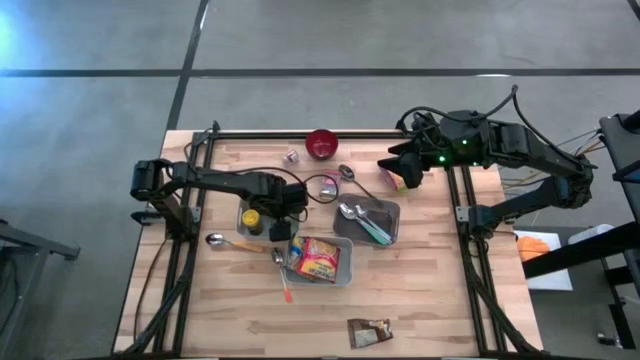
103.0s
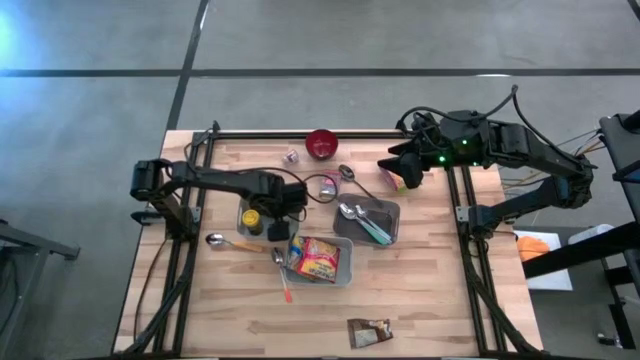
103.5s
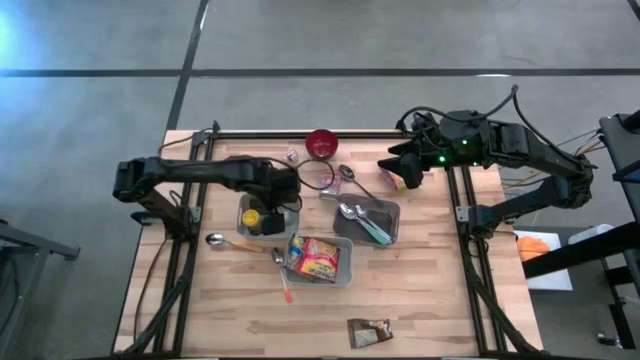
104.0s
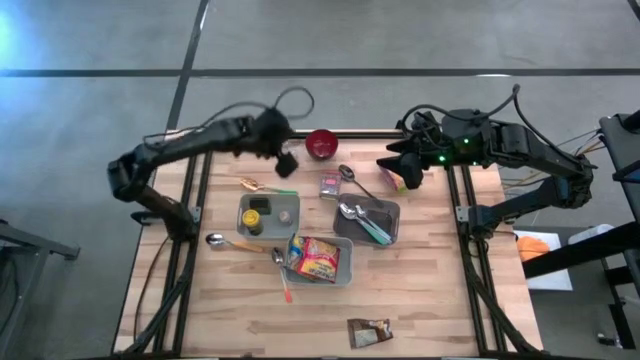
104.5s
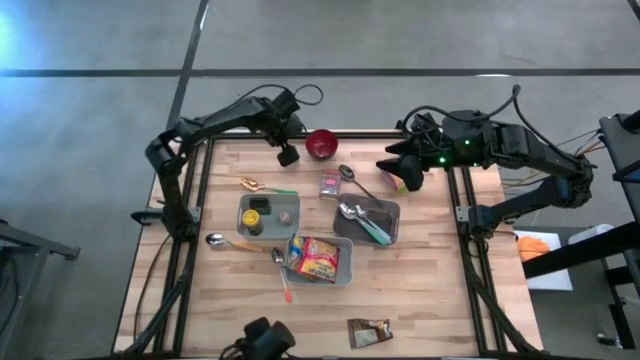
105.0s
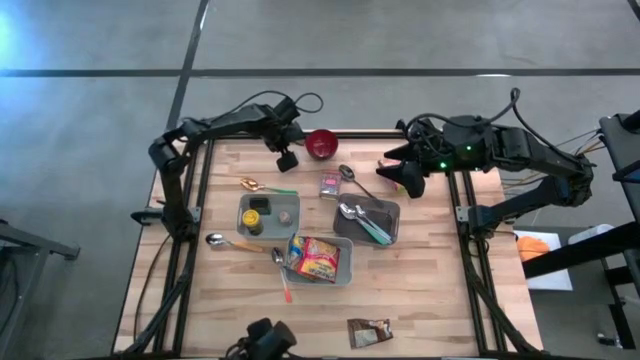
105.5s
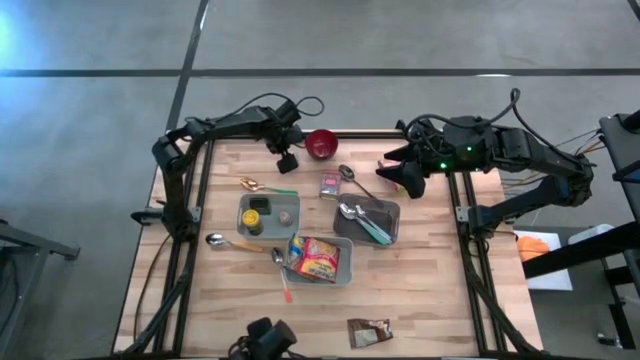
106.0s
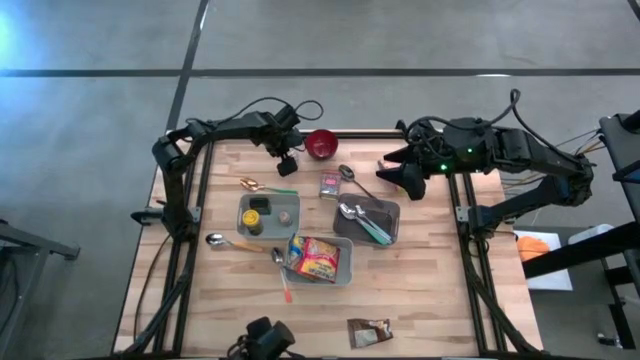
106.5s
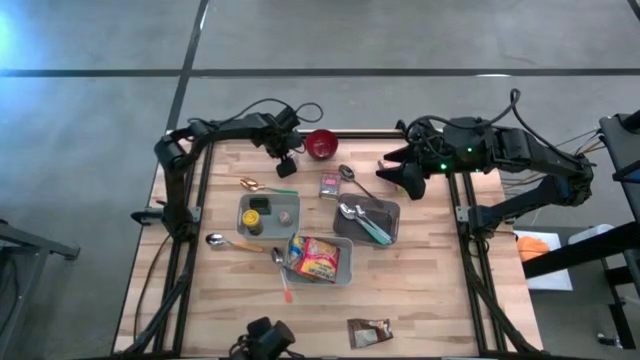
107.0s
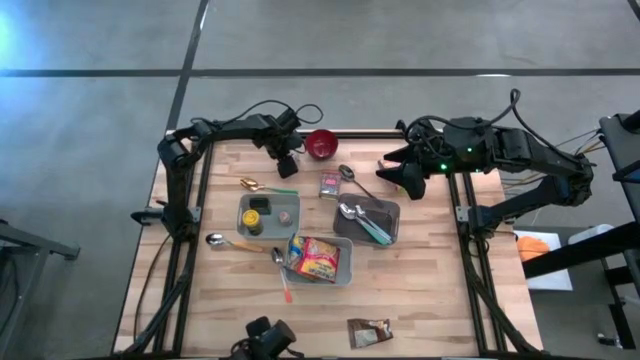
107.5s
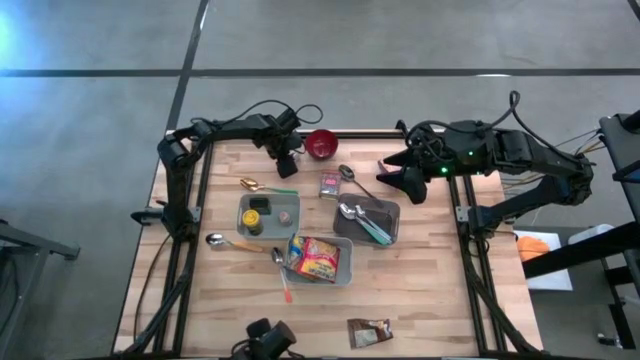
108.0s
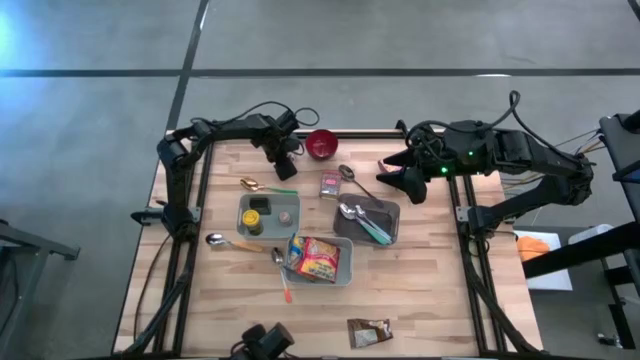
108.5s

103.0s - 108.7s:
Put the brown seasoning bottle into the top gray bin

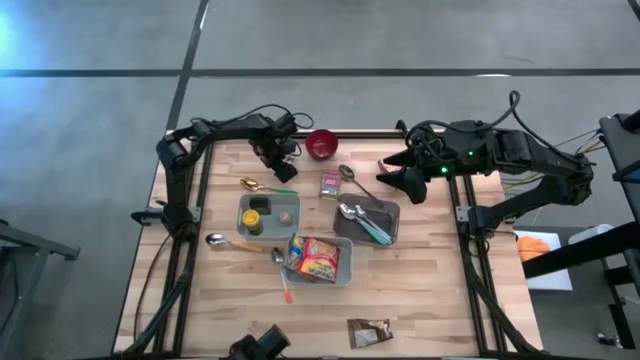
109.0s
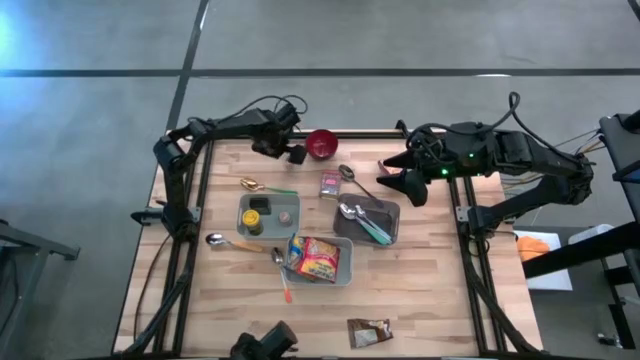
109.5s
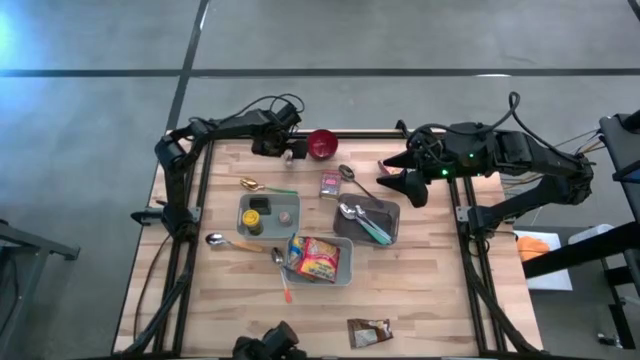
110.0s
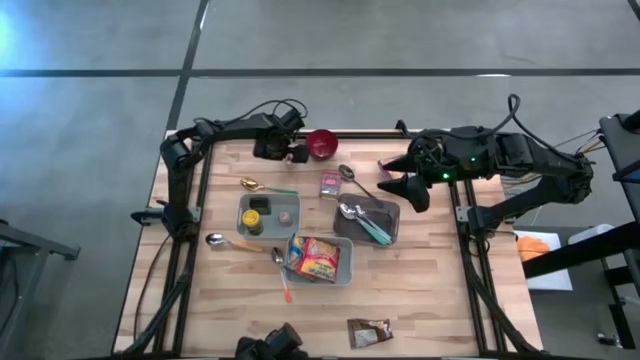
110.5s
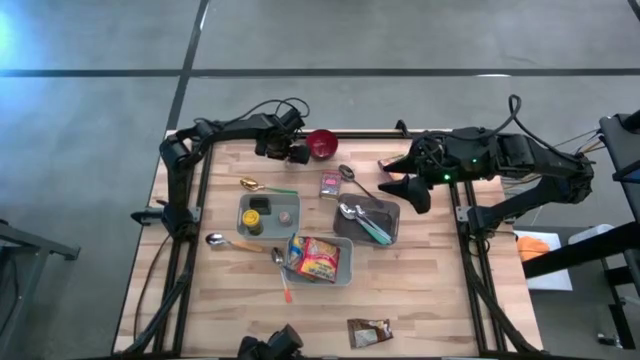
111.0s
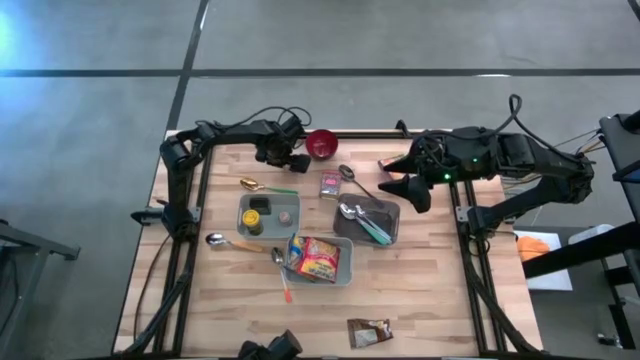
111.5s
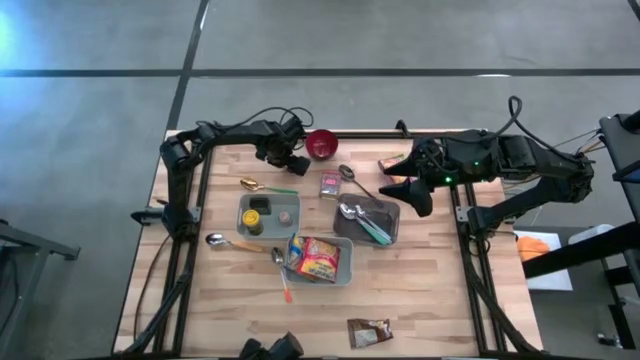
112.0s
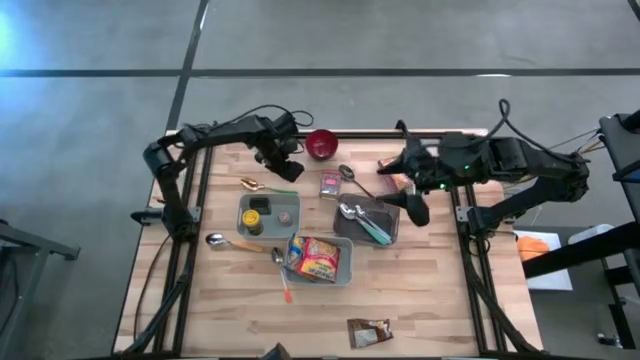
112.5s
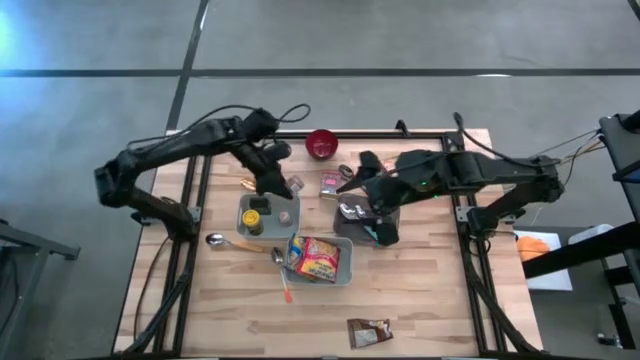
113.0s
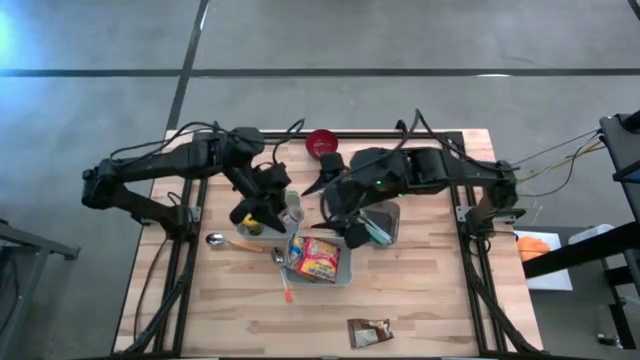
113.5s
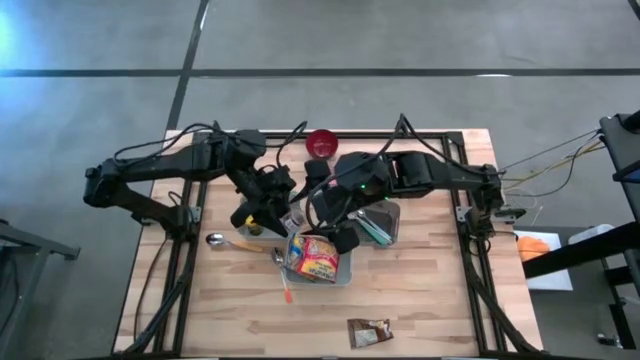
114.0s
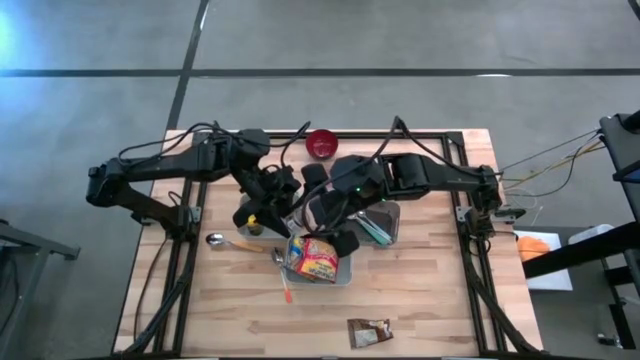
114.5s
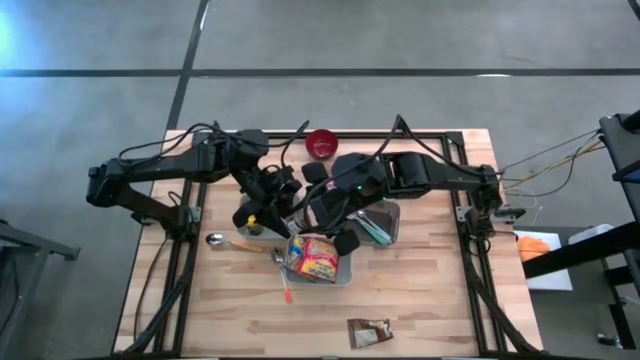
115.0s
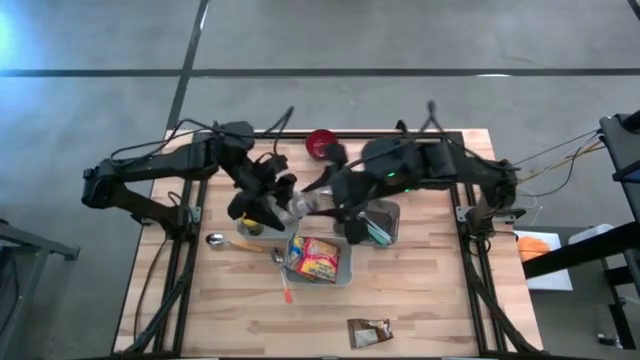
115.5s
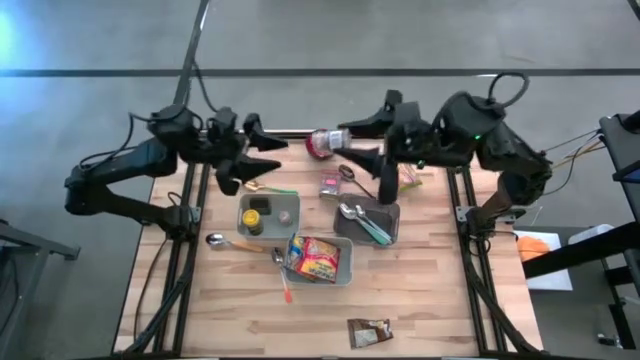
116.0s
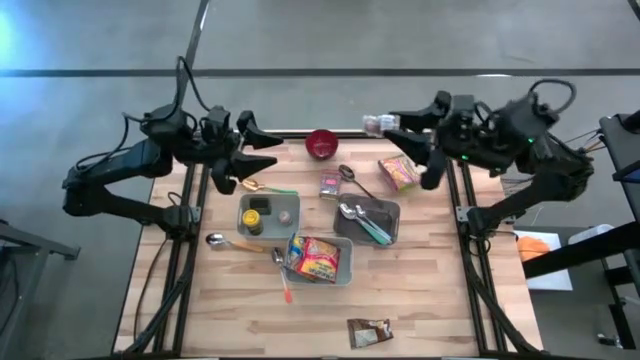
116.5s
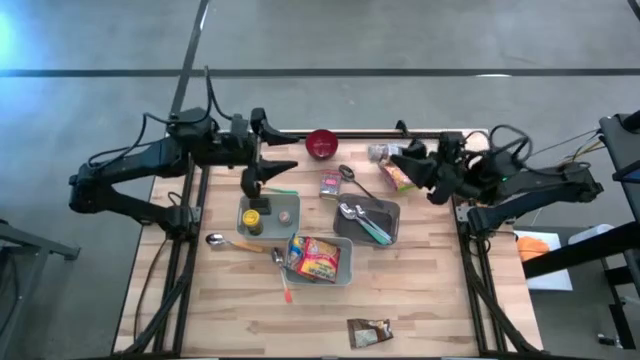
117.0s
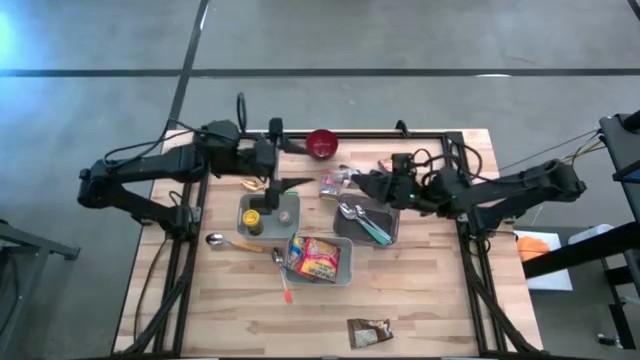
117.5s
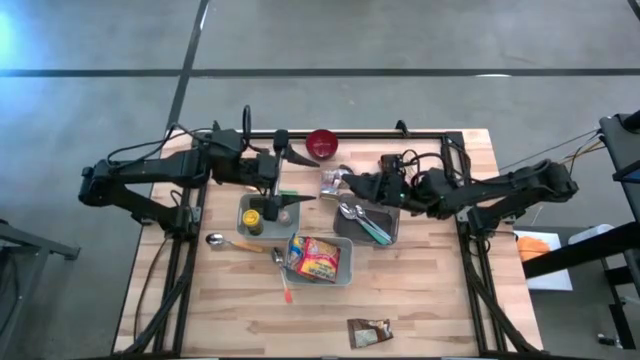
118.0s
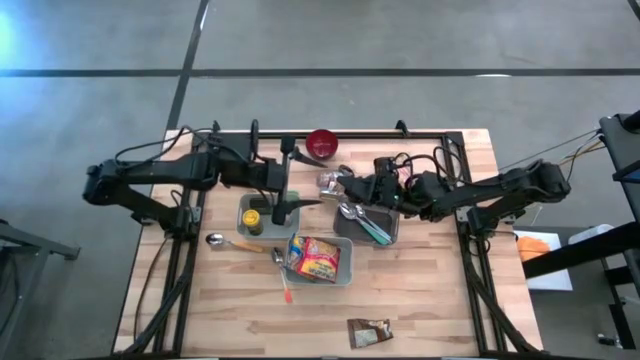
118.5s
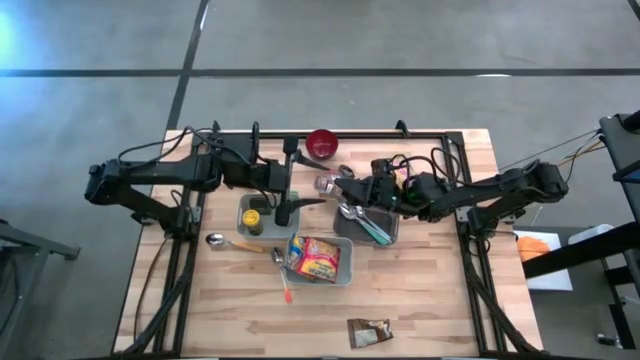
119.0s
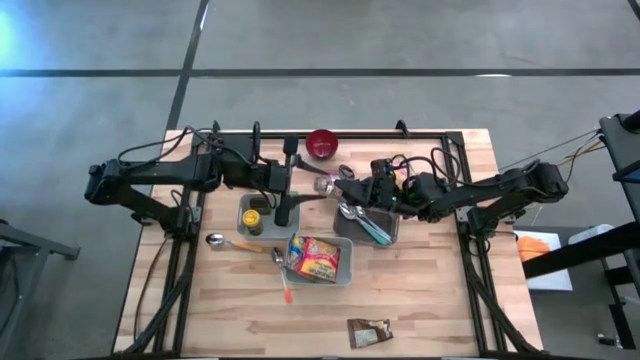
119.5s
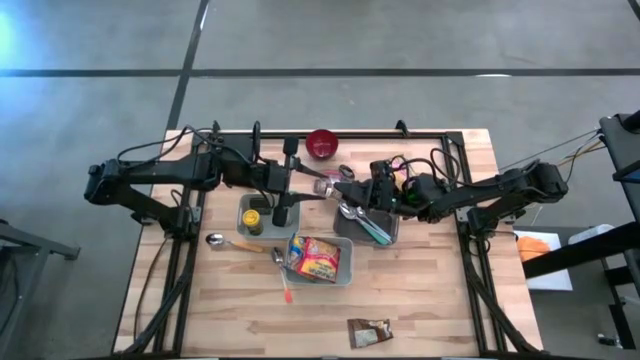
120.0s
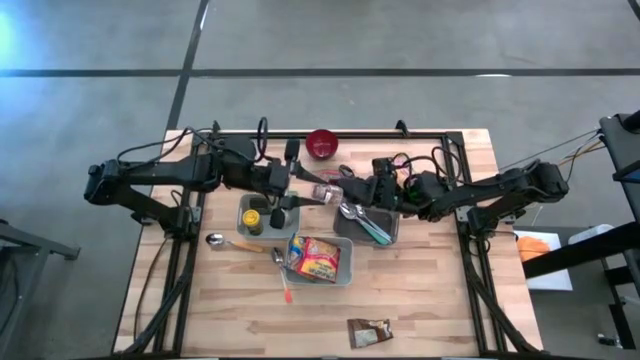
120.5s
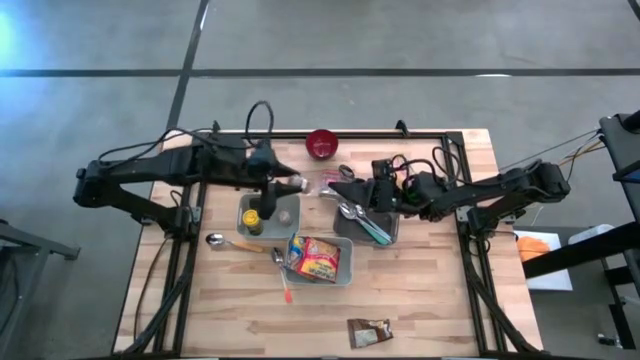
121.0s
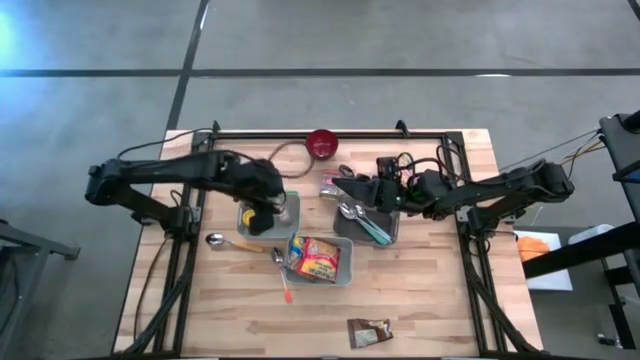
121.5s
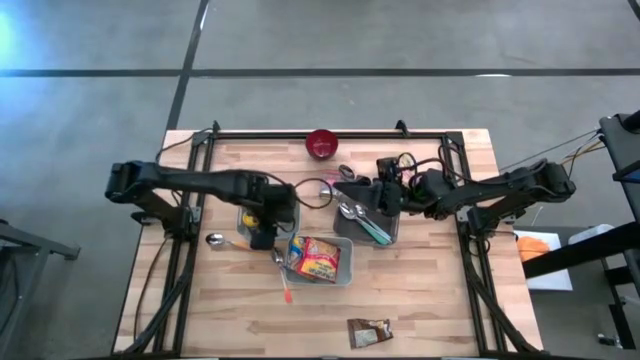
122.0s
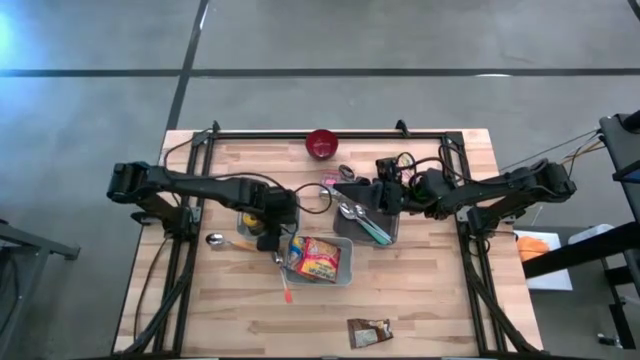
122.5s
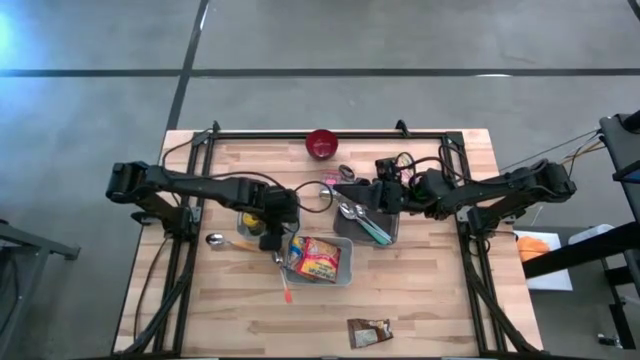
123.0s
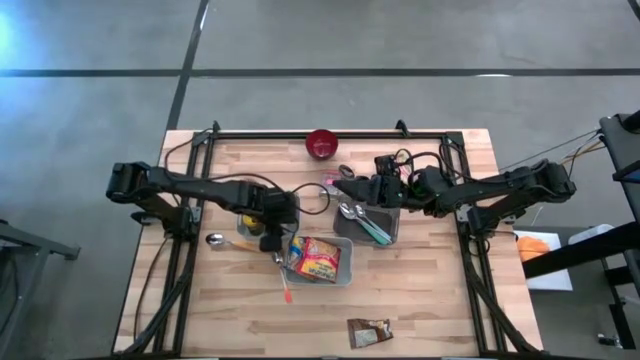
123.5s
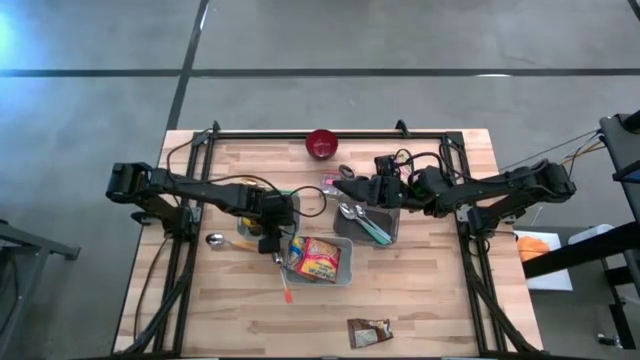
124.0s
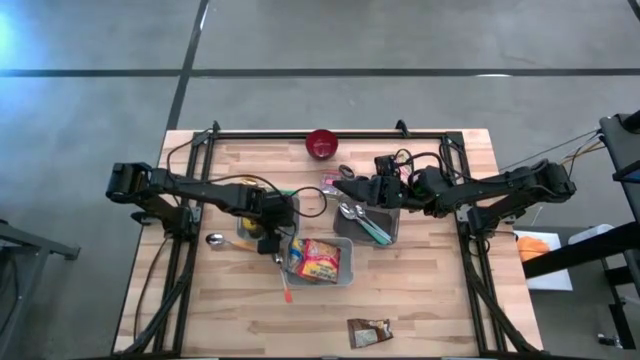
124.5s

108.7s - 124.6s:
Put the brown seasoning bottle into the top gray bin
